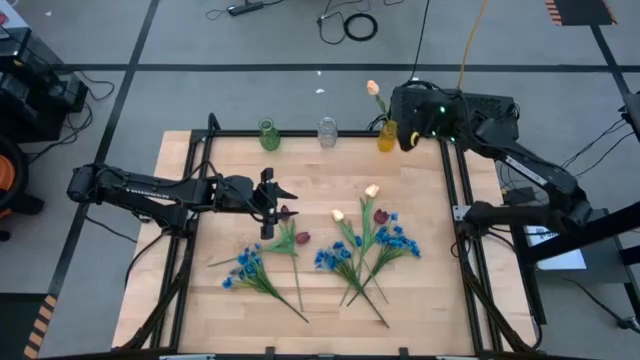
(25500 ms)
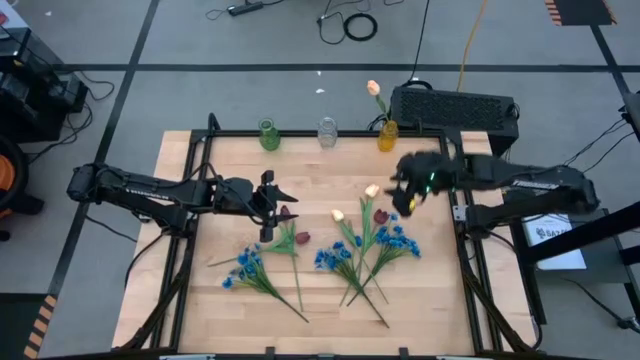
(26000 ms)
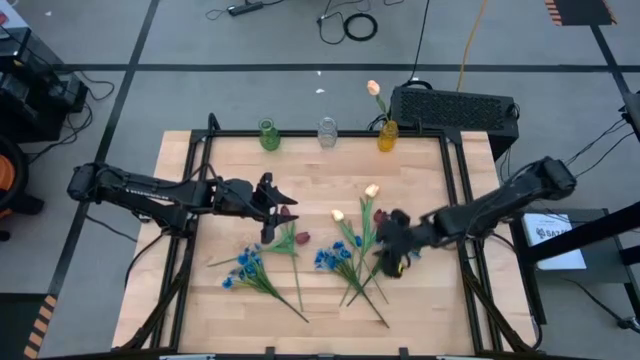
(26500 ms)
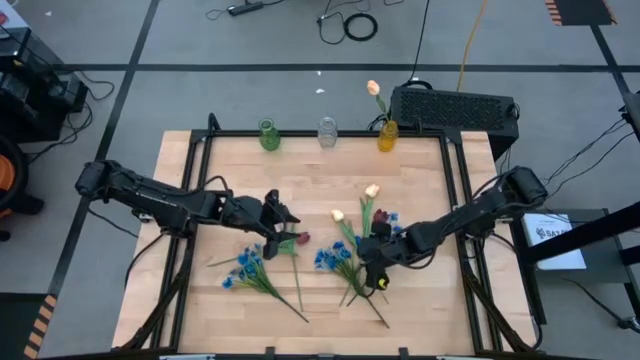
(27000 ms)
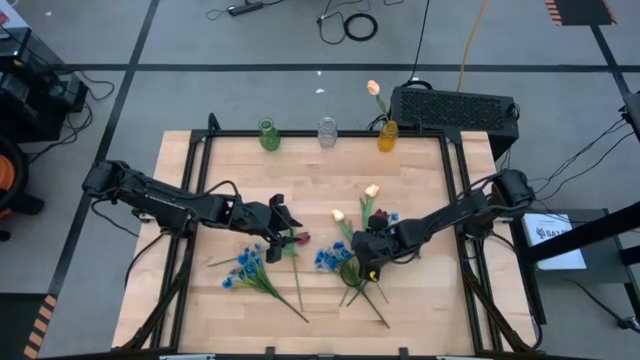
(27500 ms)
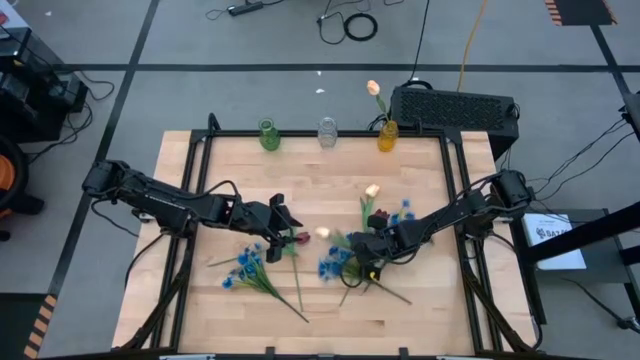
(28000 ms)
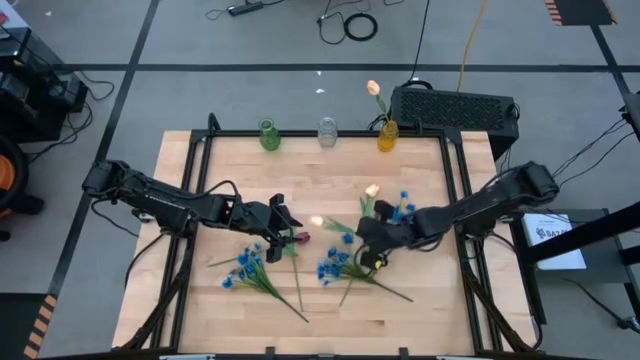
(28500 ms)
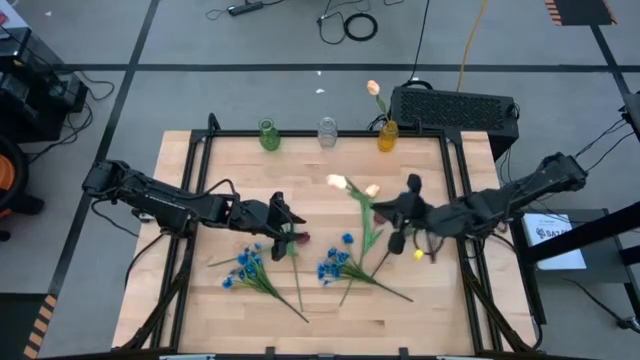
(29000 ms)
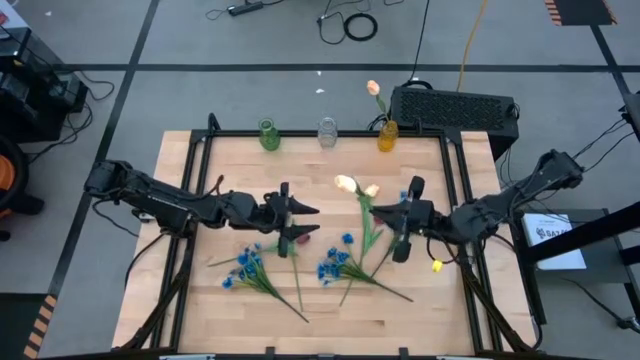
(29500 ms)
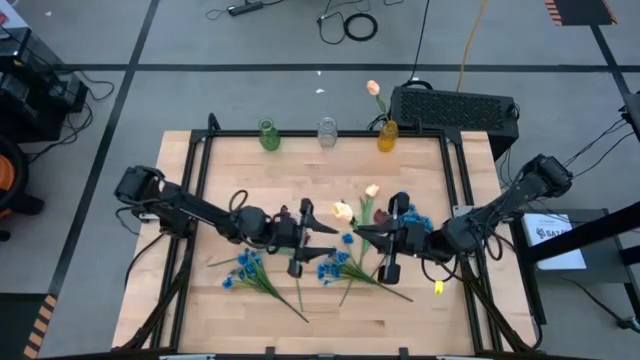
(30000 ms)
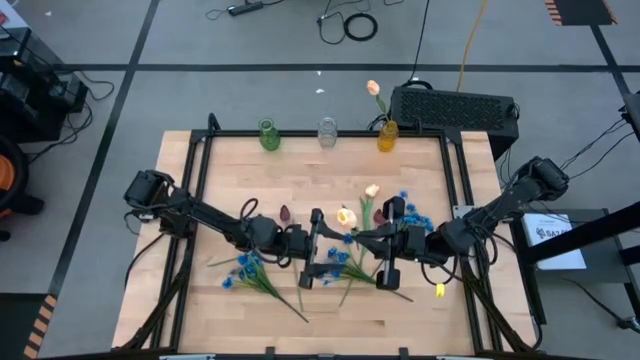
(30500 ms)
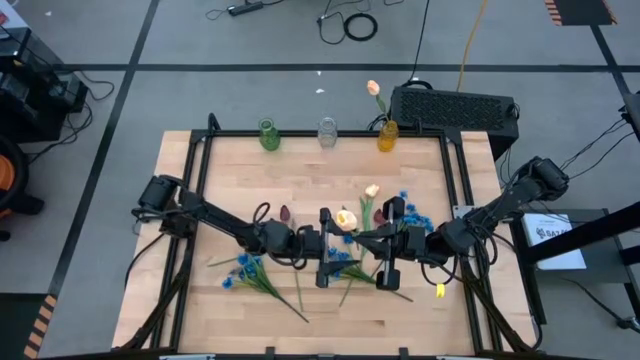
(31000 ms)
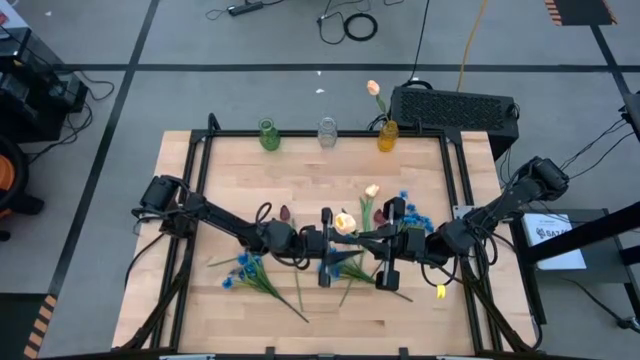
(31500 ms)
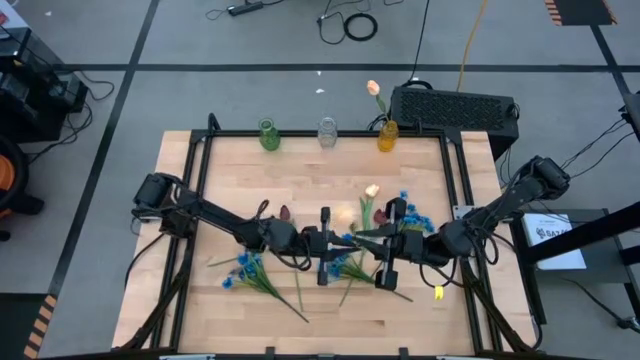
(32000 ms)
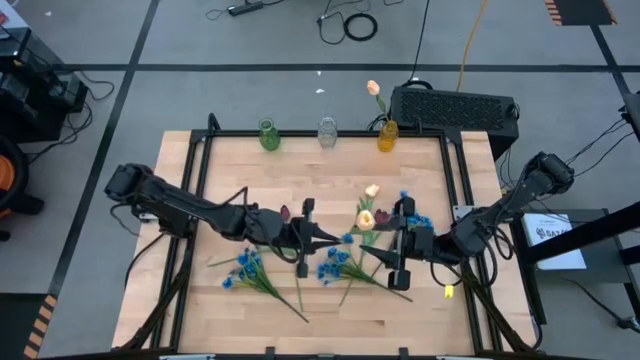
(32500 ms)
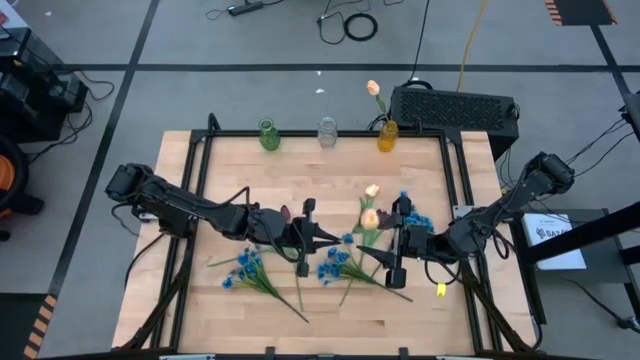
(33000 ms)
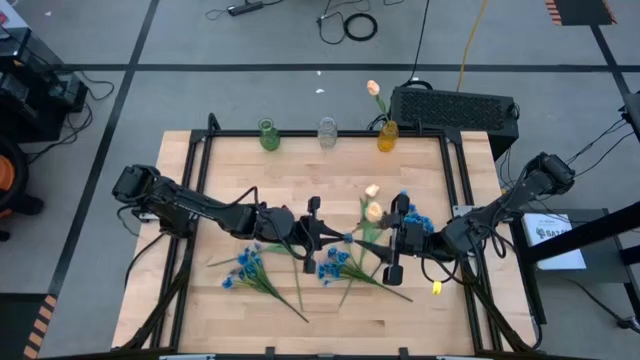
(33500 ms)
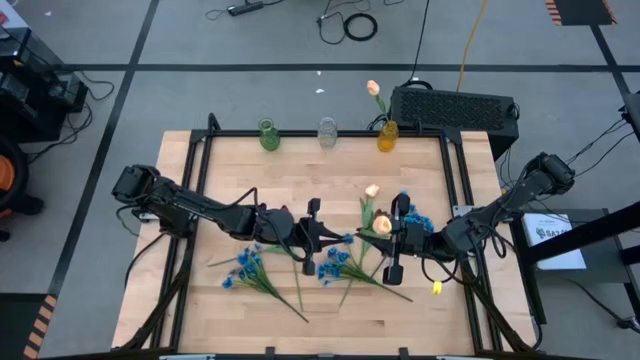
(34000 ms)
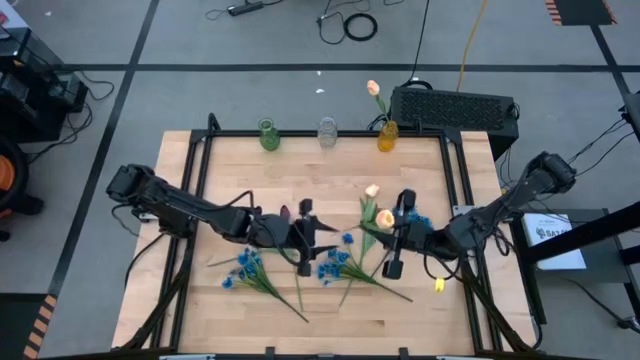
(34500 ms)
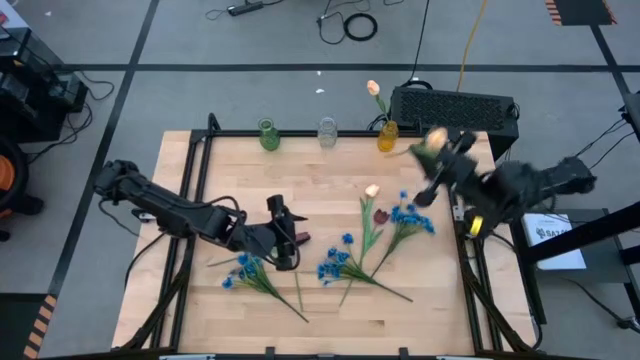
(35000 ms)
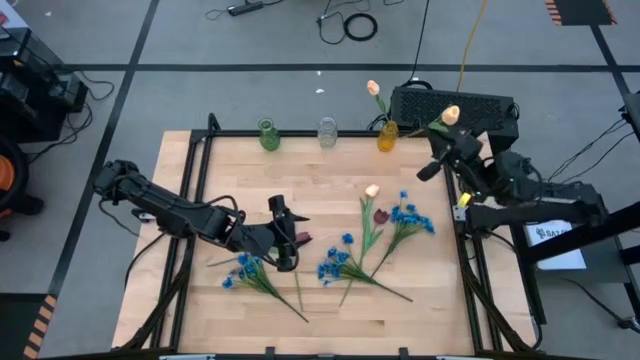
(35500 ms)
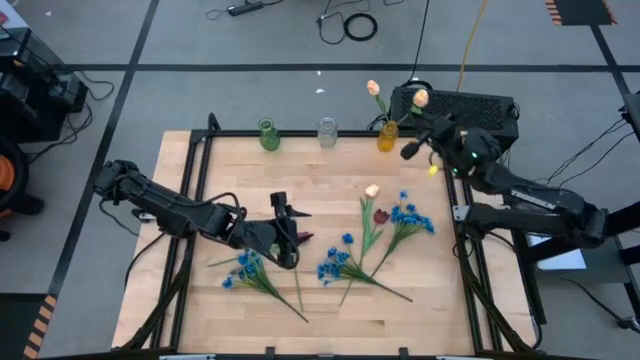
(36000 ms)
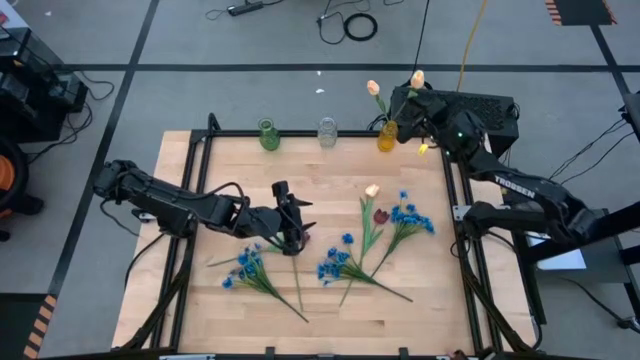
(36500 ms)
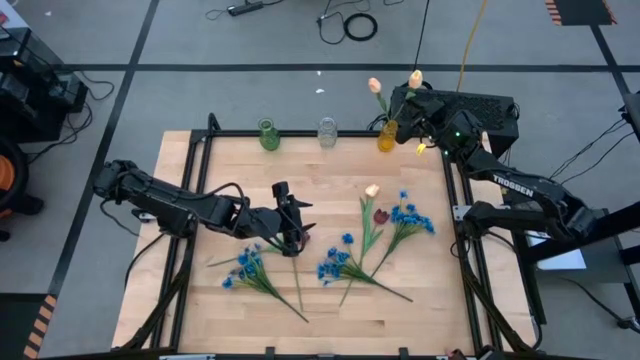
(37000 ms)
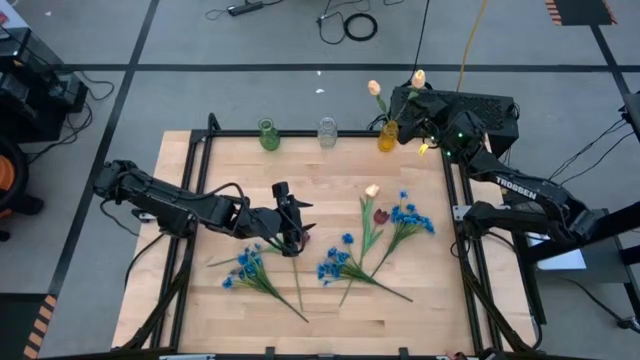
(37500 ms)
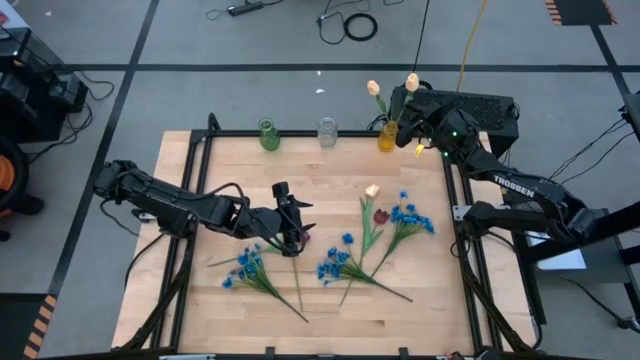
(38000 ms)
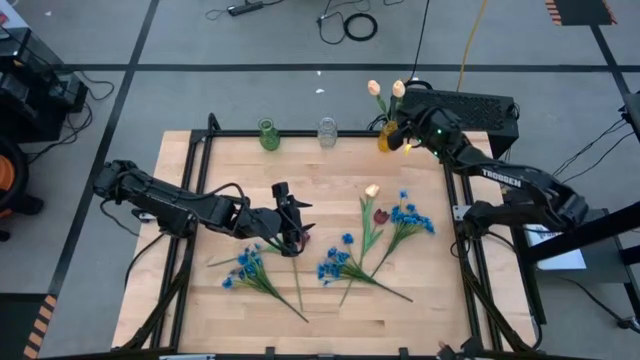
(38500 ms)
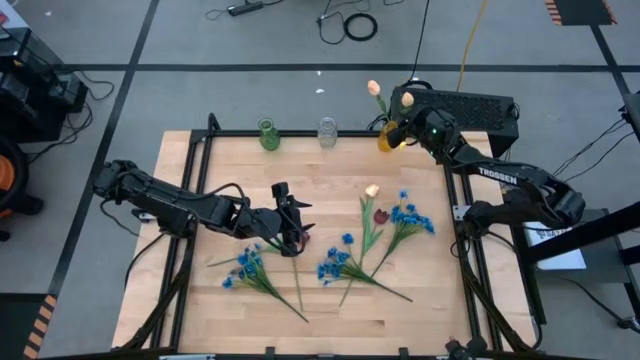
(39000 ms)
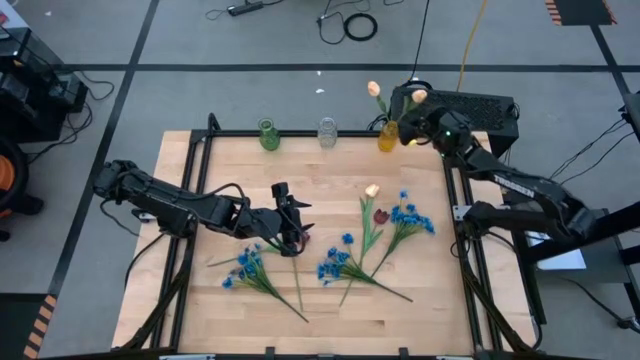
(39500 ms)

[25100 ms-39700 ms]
Task: Sort flowers into vase by color
Put the left yellow tulip into the orange vase

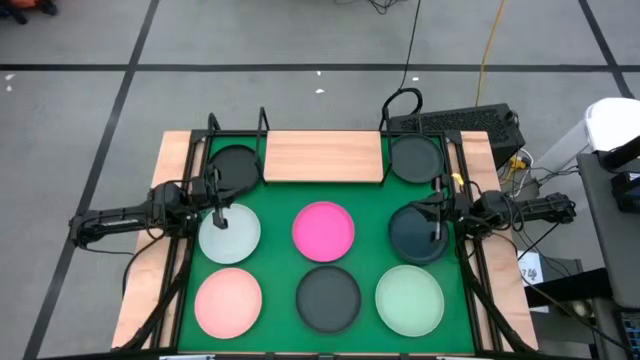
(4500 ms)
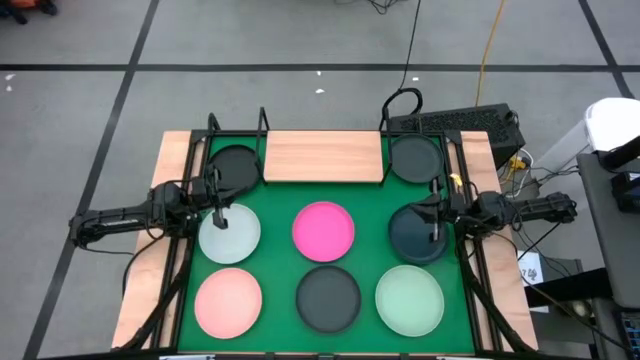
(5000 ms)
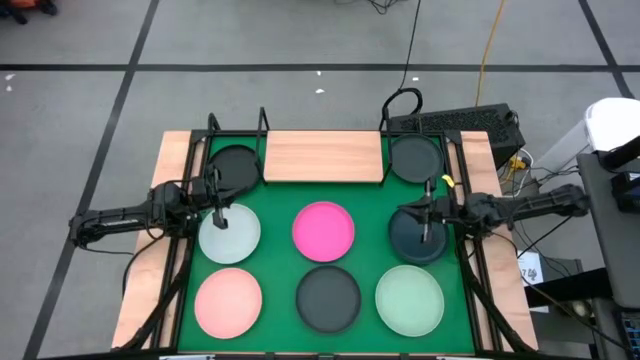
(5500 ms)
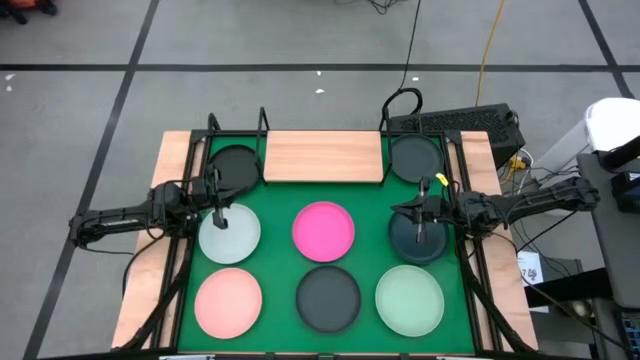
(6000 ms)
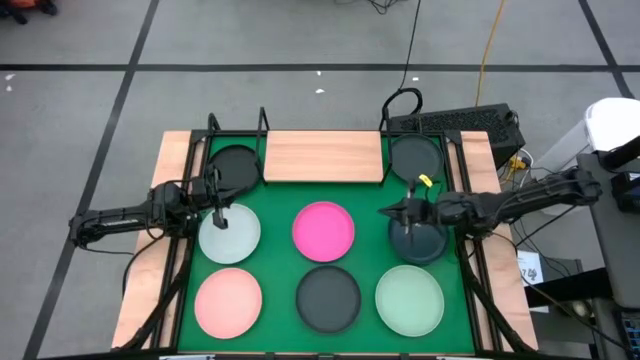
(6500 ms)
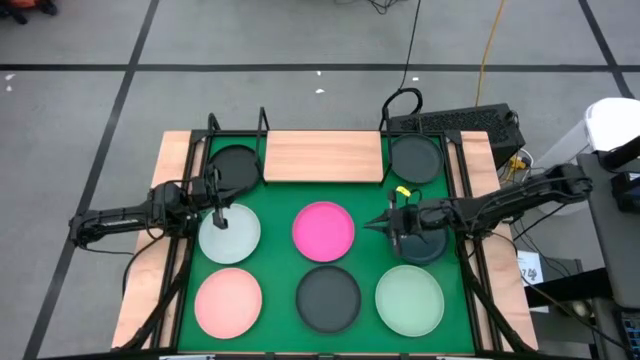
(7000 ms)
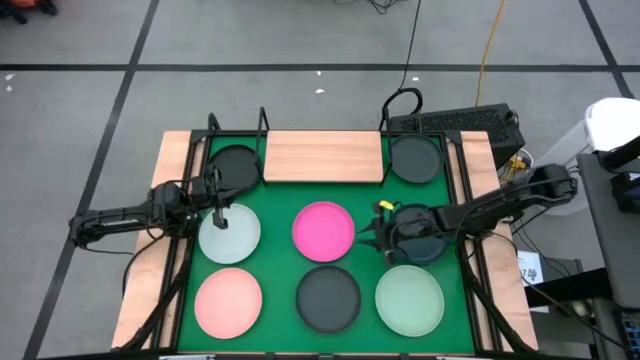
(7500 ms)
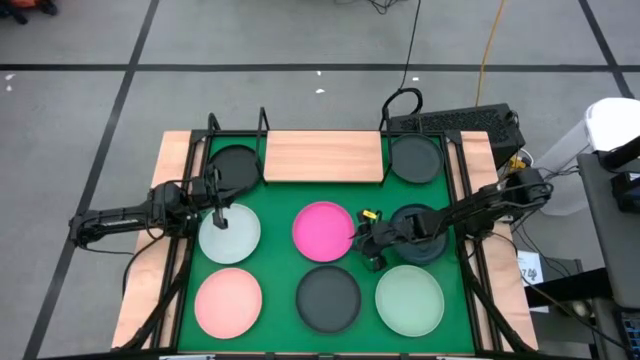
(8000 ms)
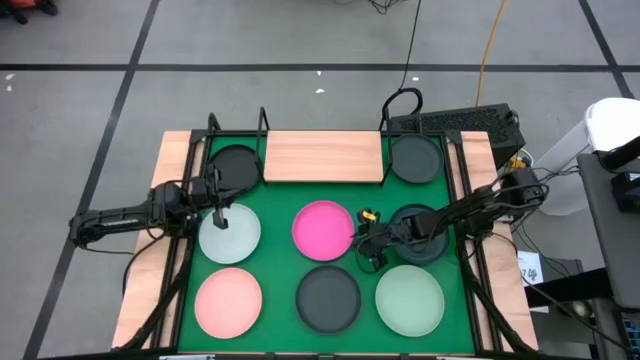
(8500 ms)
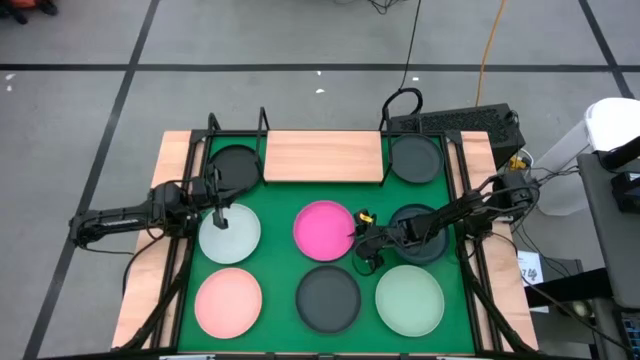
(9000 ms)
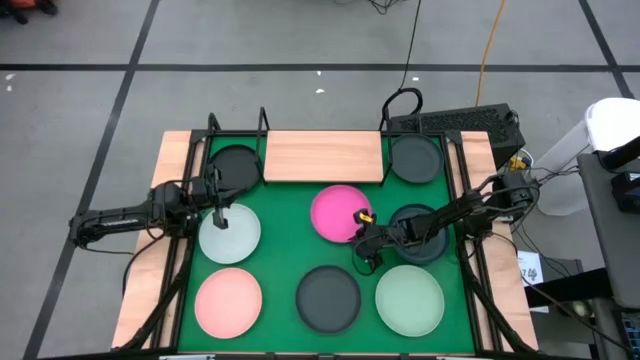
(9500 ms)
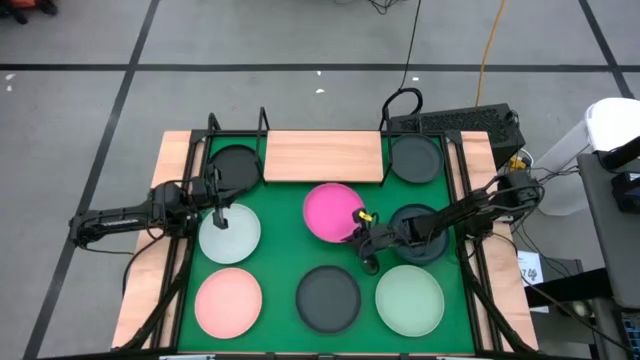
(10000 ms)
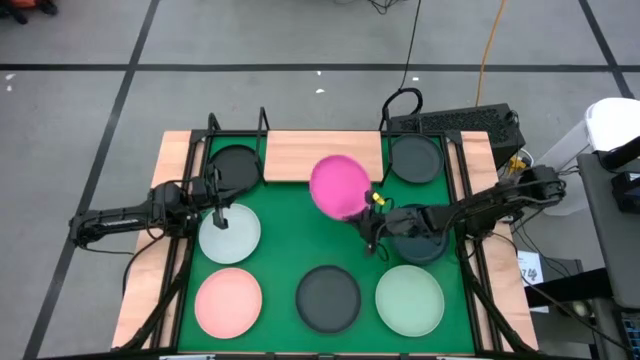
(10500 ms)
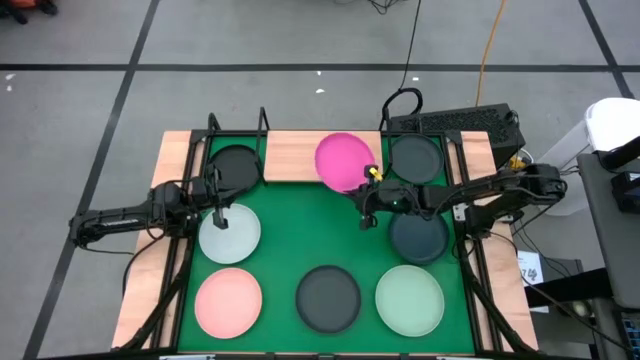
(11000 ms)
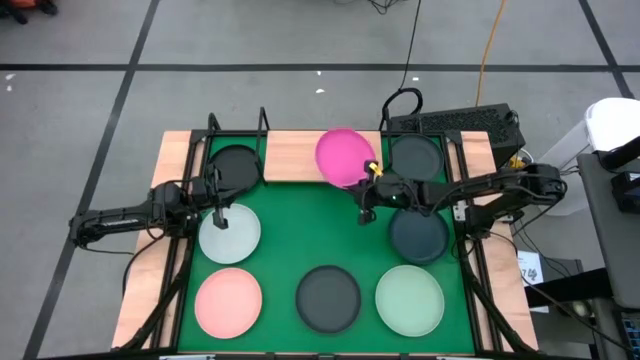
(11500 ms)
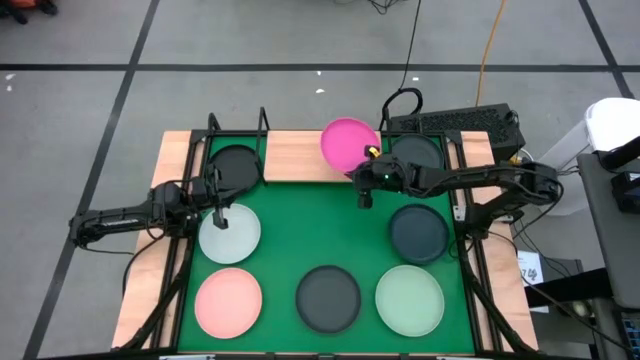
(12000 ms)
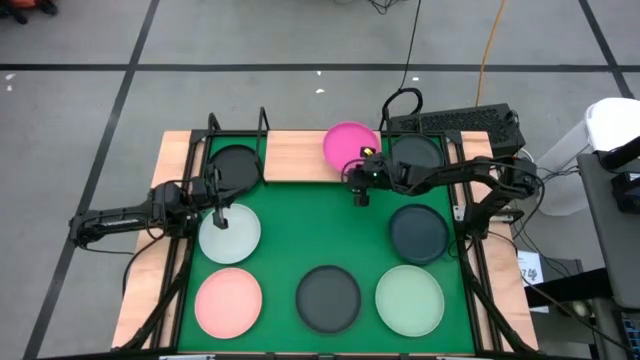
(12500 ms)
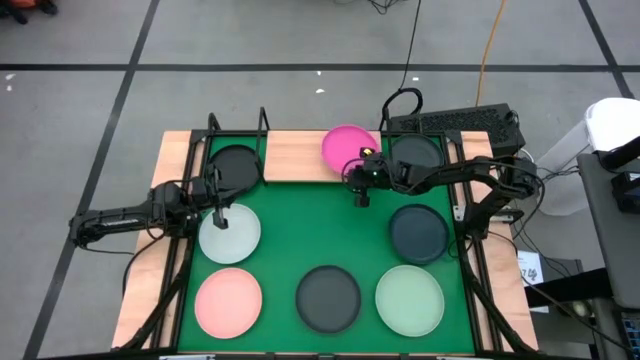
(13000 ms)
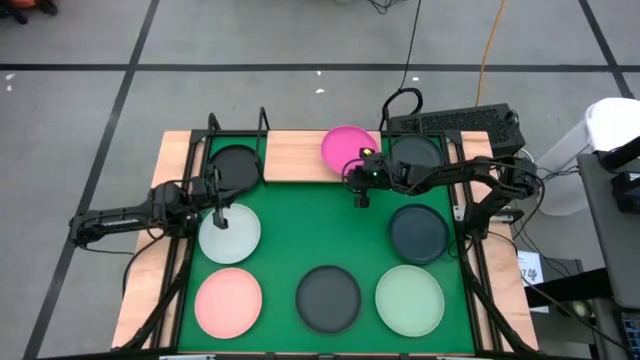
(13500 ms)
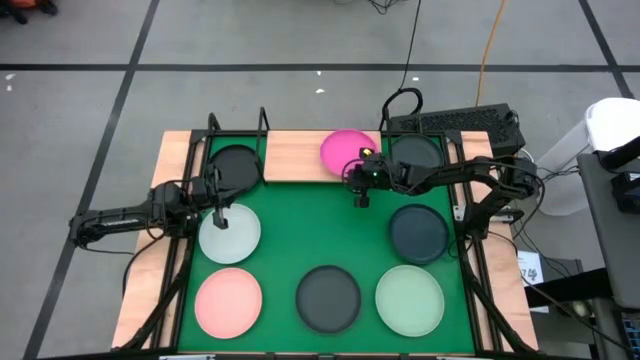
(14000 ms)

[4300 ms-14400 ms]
Task: Place and stack plates onto a shelf
Put the pink plate on the shelf
